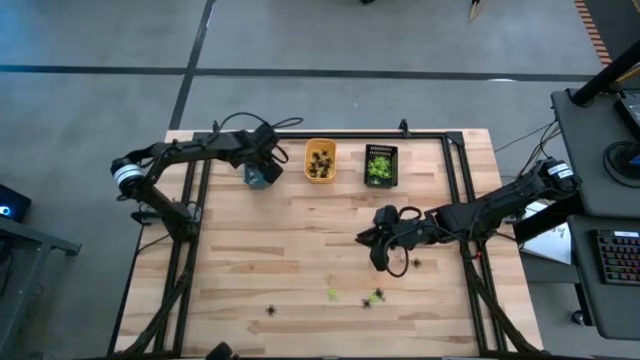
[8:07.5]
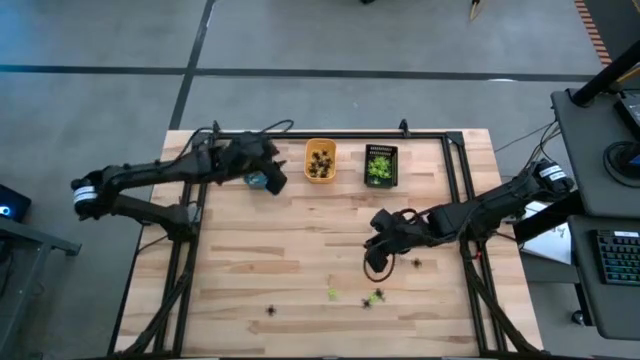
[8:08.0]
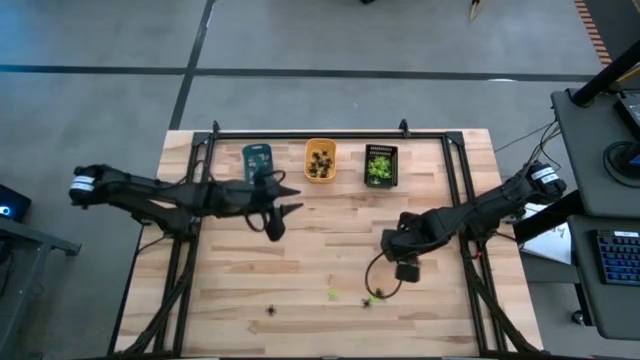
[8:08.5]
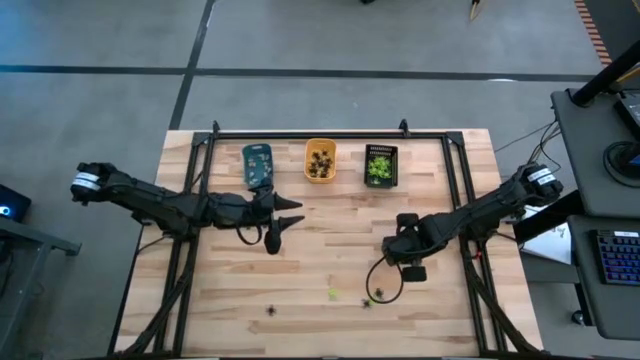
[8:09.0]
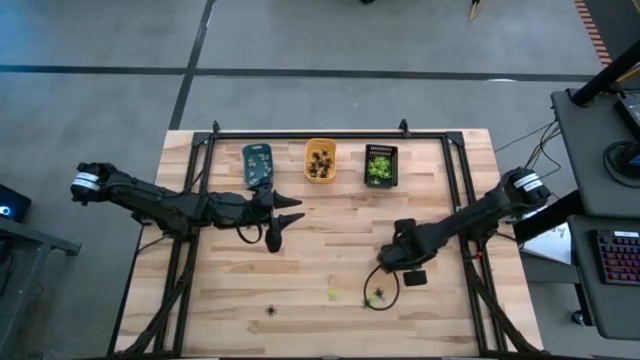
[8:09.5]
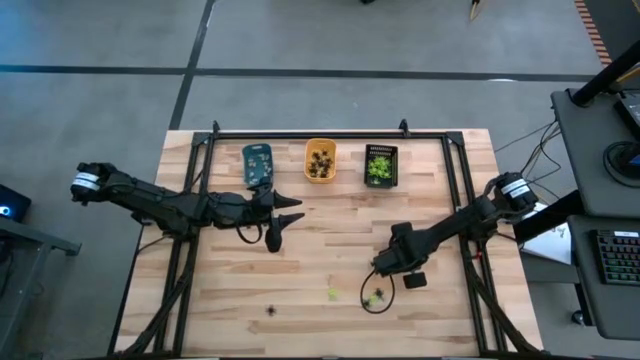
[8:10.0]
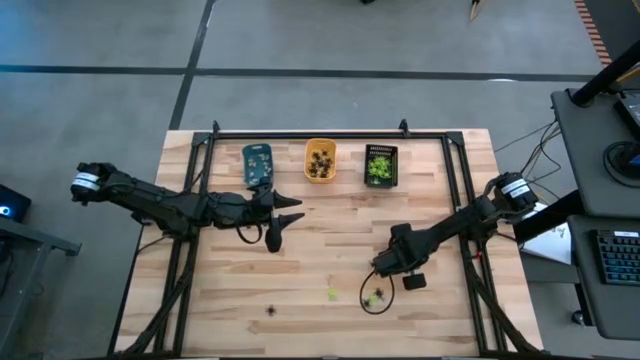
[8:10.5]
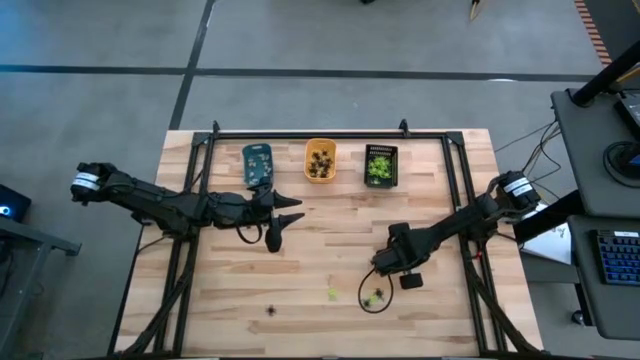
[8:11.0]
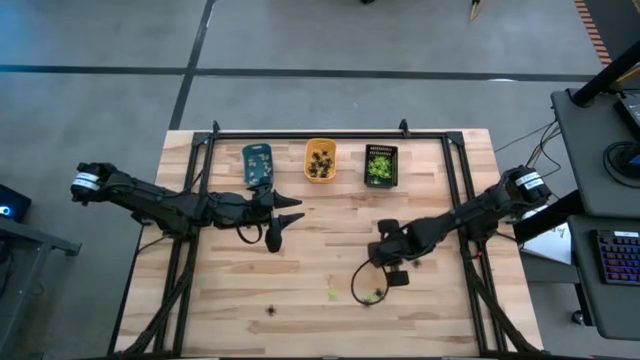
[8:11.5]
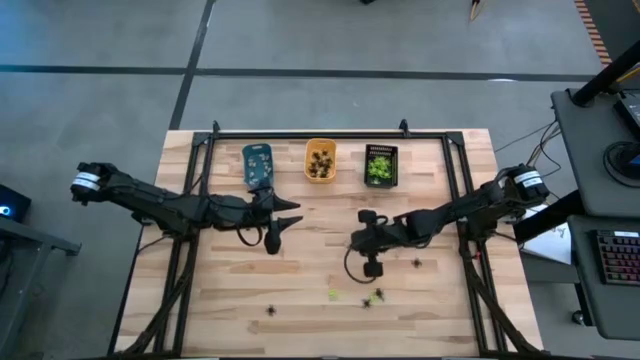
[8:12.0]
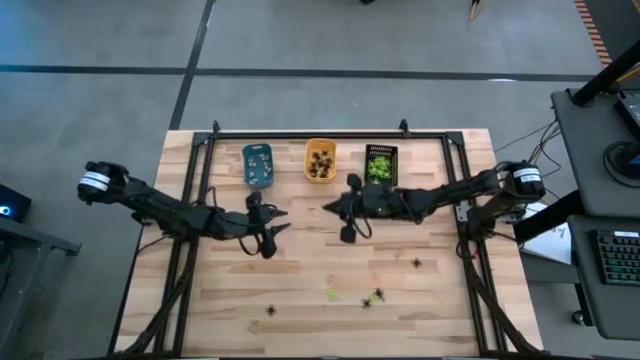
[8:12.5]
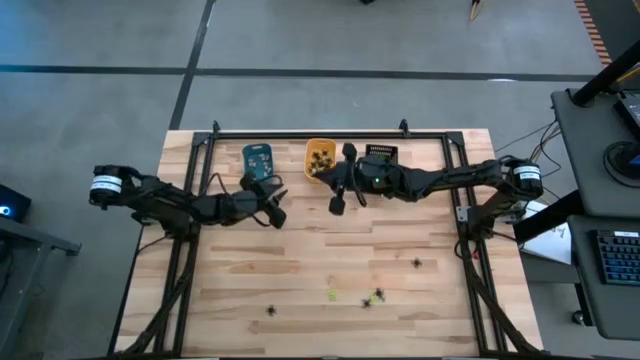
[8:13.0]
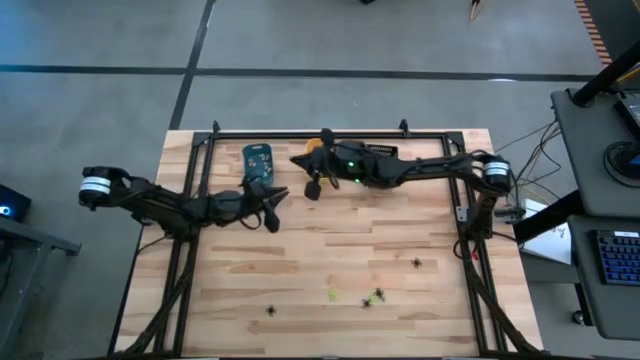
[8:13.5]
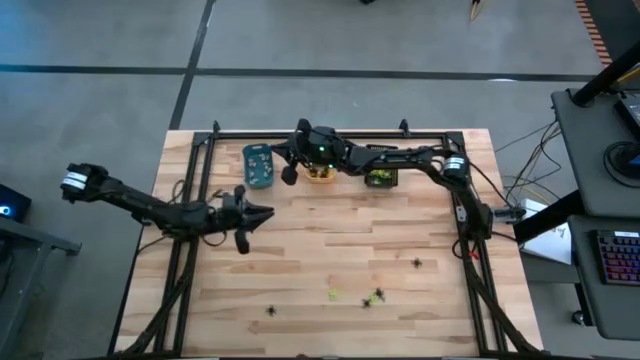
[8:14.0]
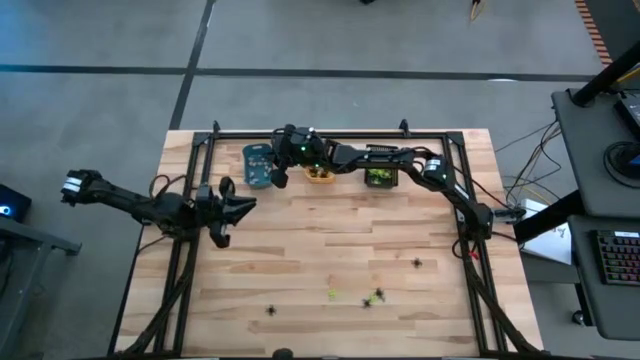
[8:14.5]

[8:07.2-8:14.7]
Task: Sort Halloween decoration
Put the white skull toy into the blue bin

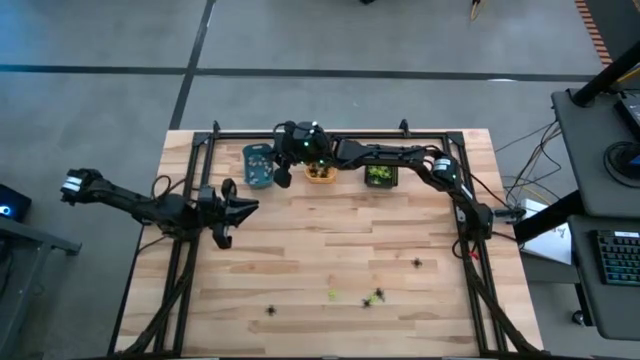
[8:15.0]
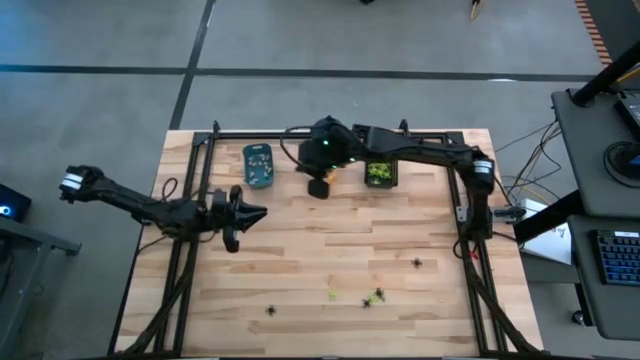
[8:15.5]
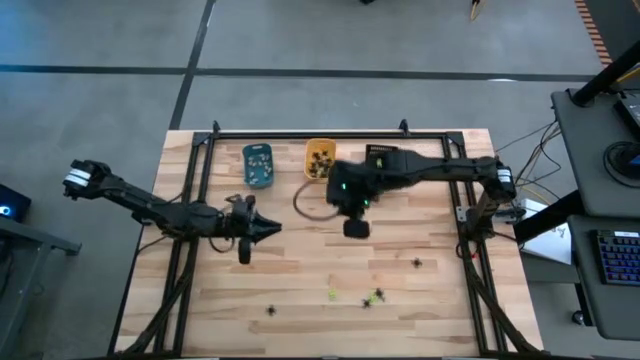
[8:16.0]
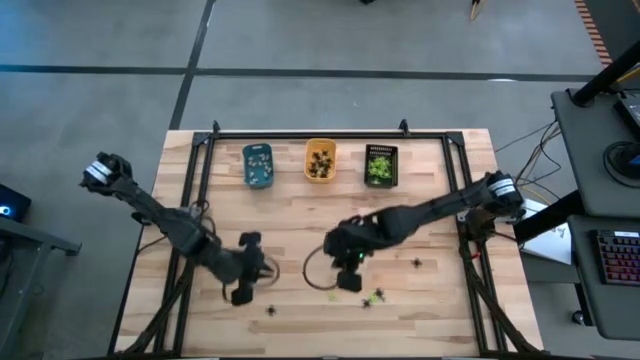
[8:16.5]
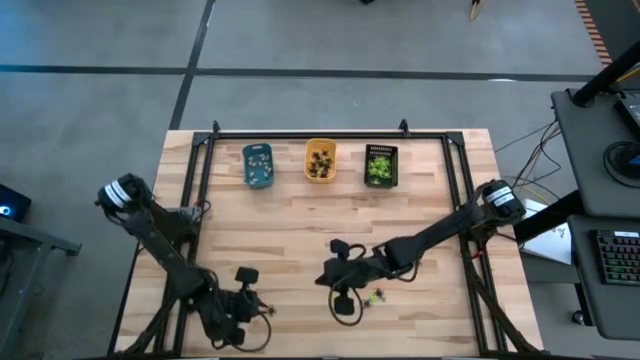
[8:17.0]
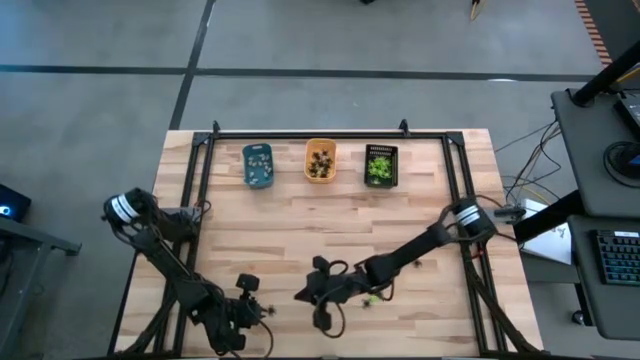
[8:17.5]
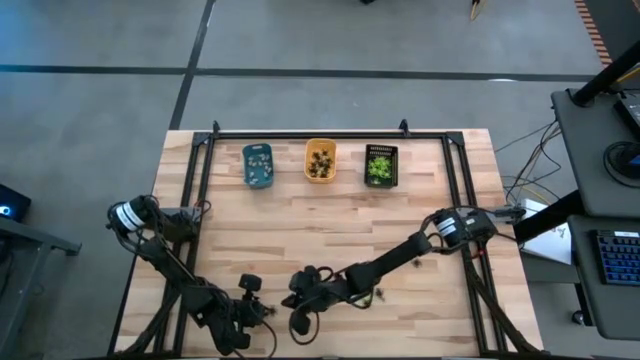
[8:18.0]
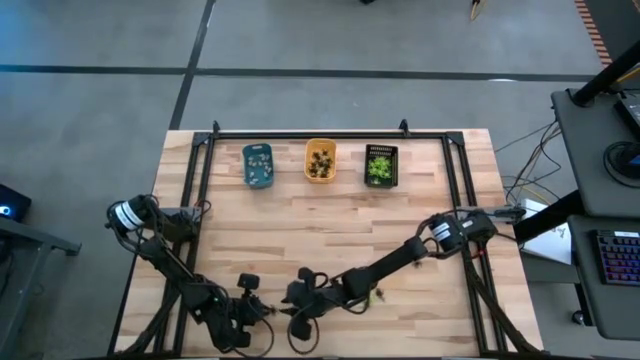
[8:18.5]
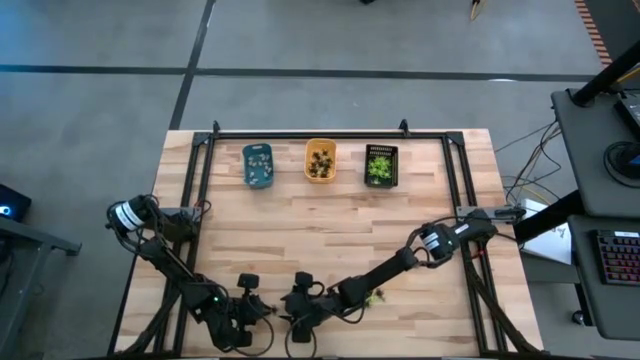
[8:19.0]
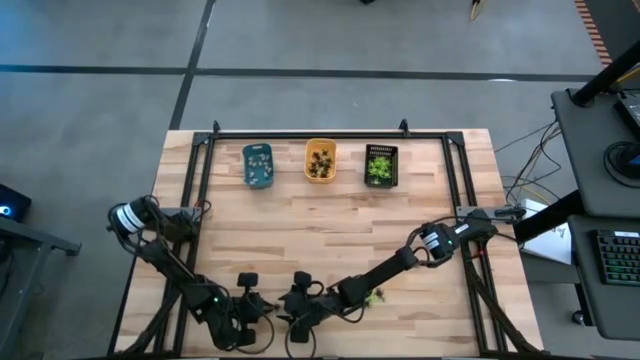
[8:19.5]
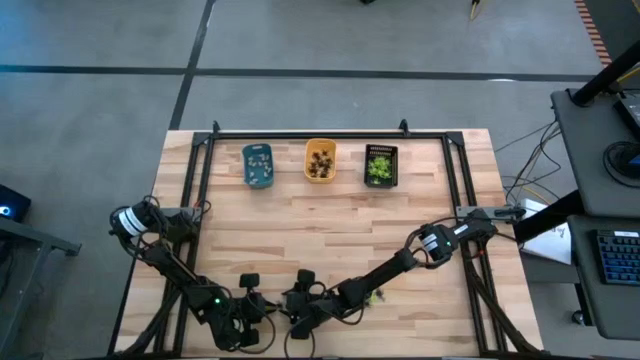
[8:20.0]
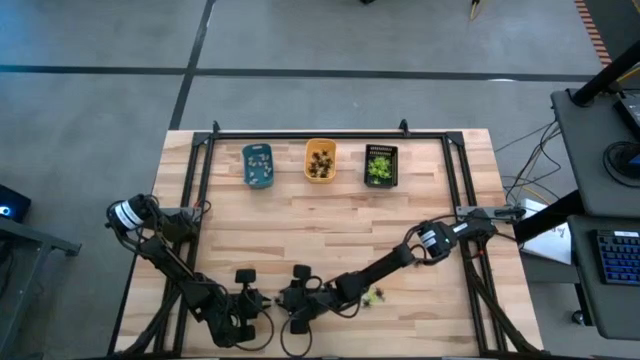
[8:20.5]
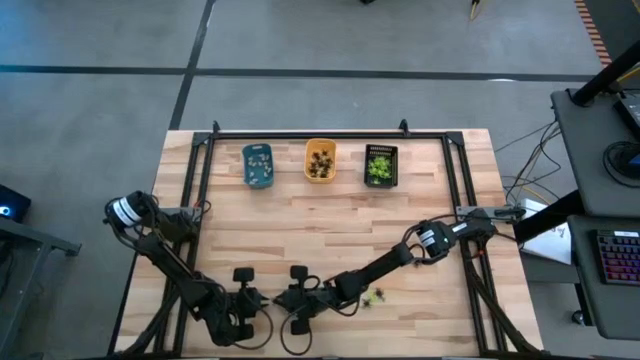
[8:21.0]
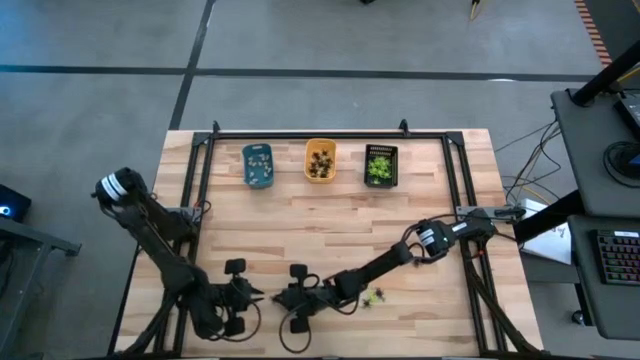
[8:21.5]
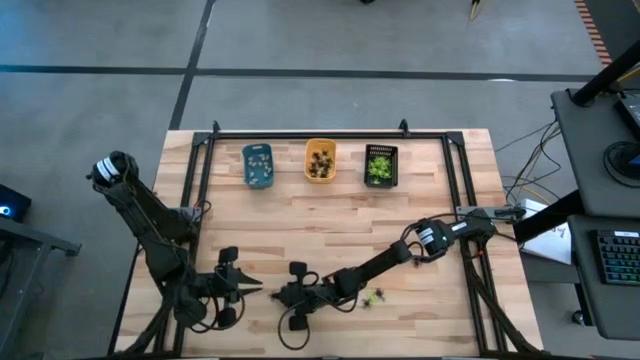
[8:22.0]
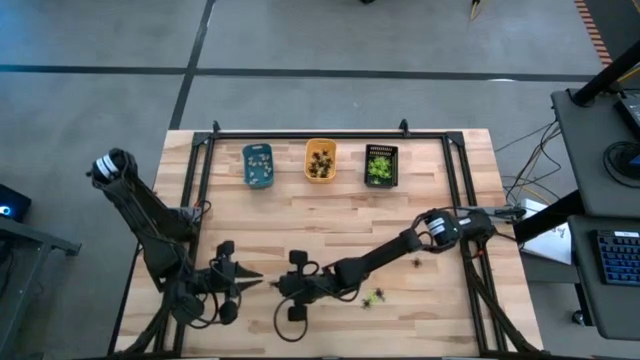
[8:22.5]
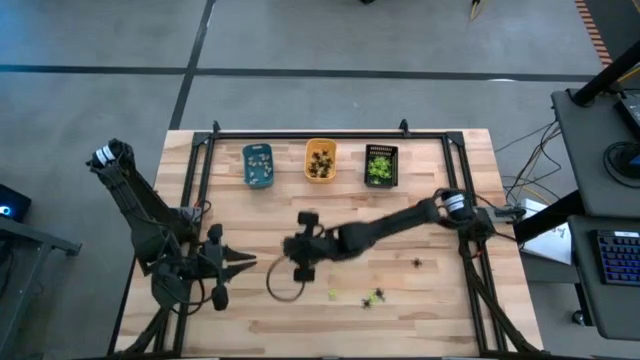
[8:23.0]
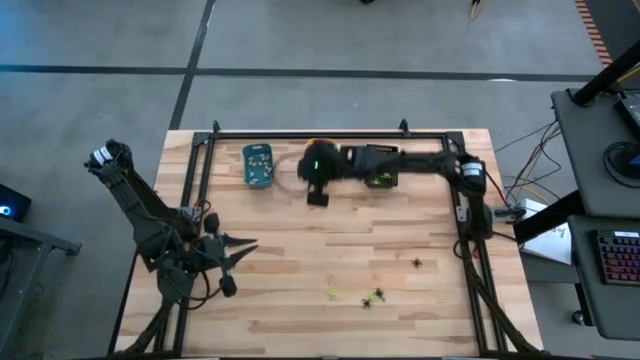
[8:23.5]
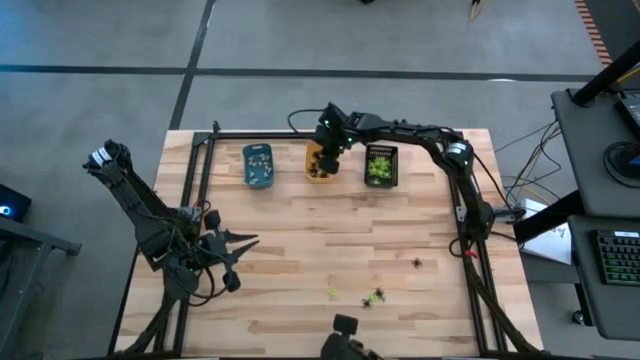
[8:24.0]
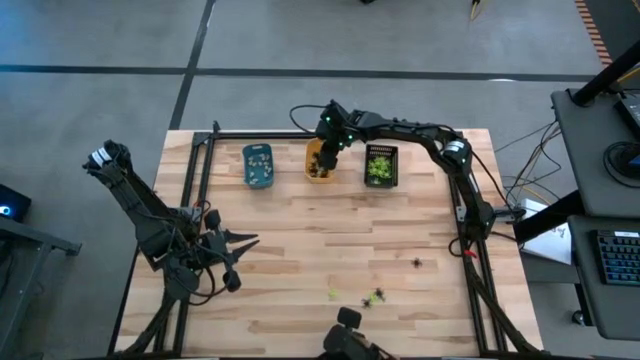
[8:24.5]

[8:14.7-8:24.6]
Put the black spider toy into the orange bin

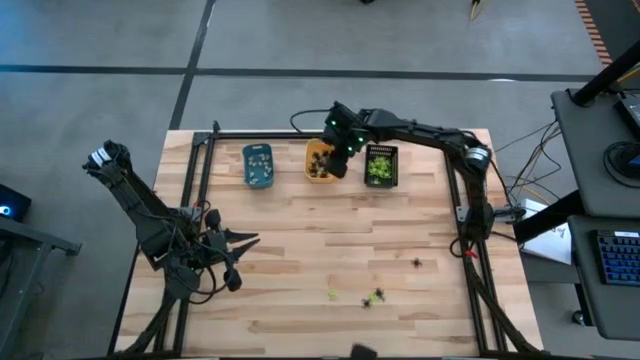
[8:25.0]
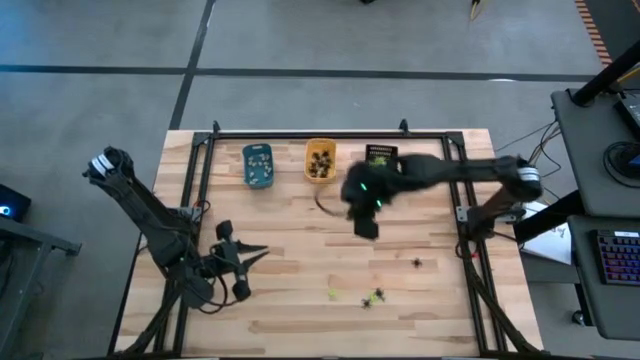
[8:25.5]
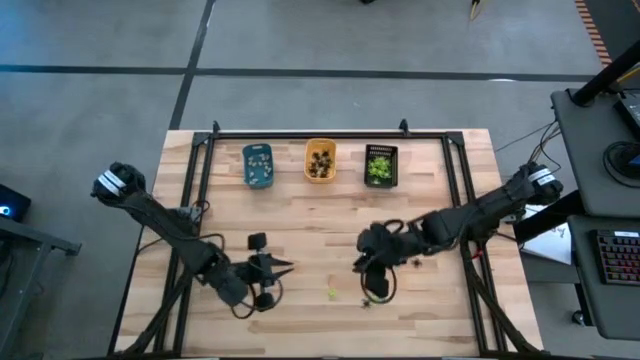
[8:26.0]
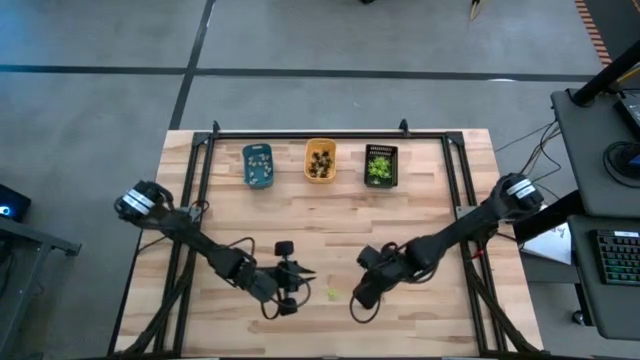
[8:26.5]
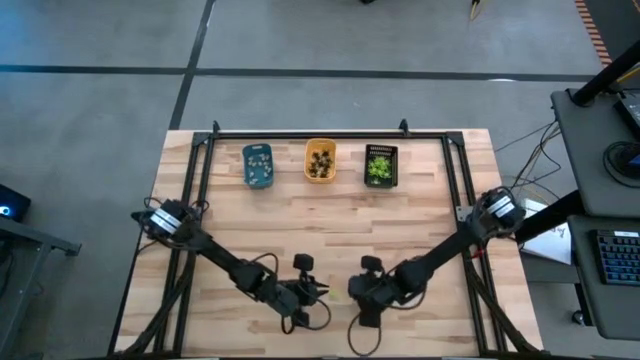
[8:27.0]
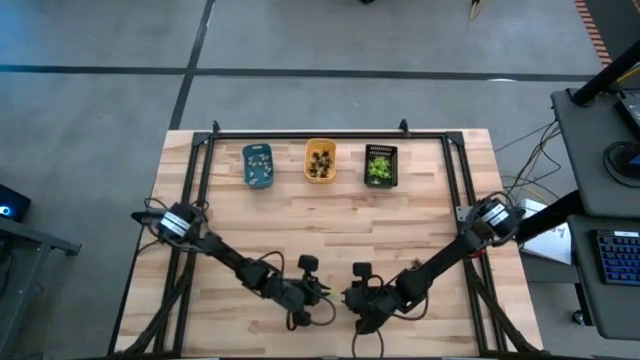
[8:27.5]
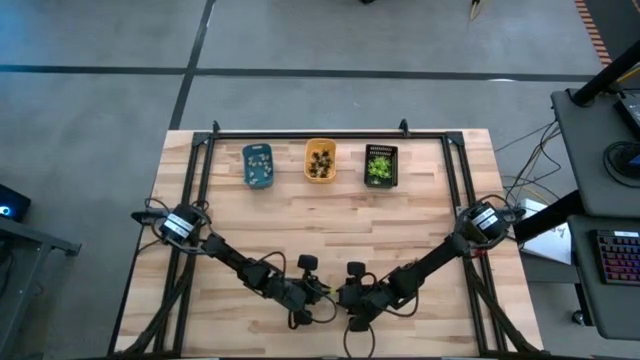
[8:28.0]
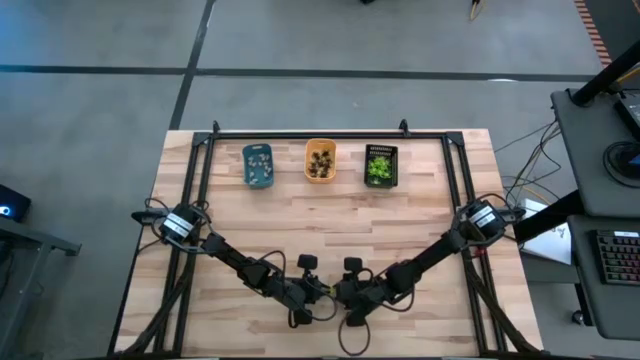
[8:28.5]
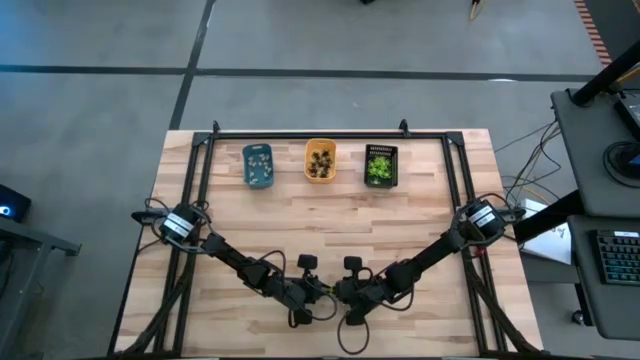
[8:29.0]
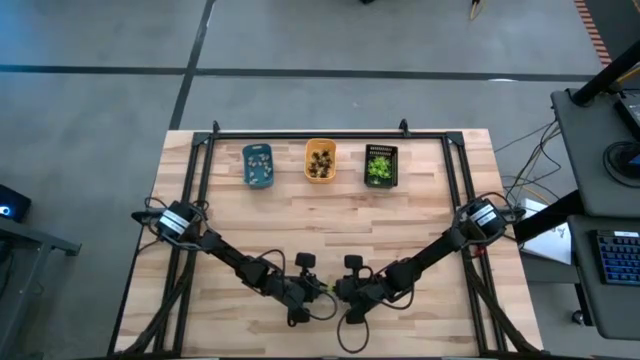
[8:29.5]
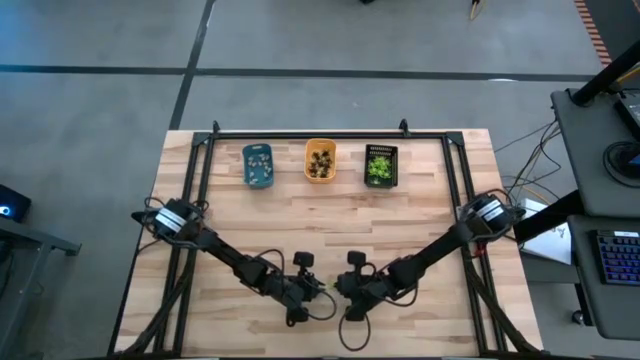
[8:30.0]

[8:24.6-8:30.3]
Put the green spider toy into the black bin
